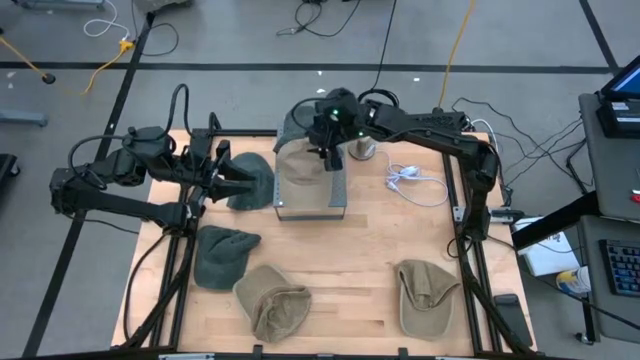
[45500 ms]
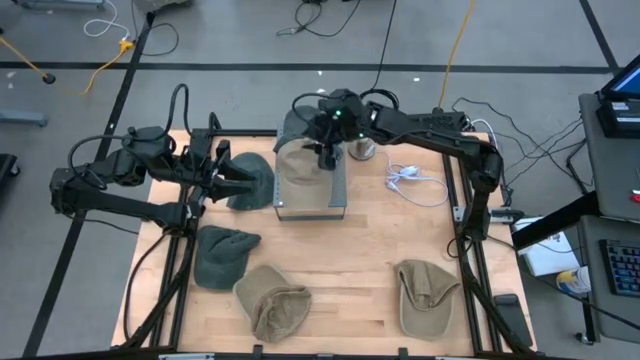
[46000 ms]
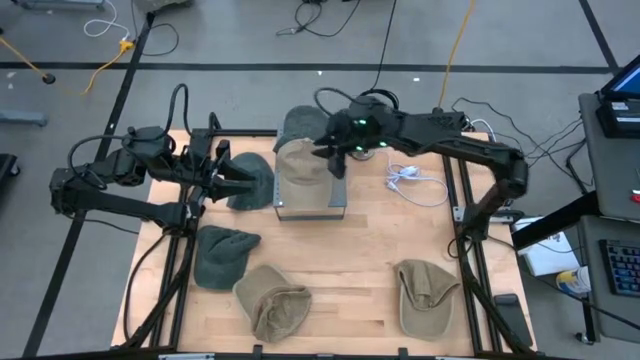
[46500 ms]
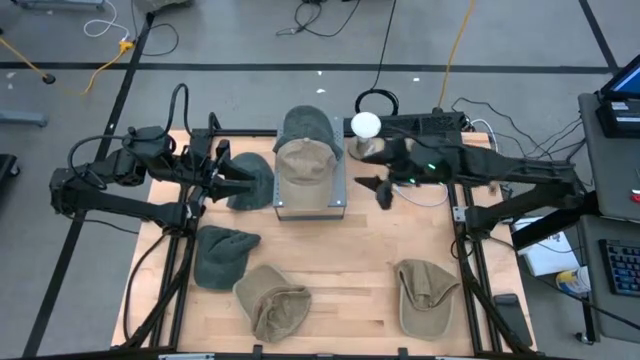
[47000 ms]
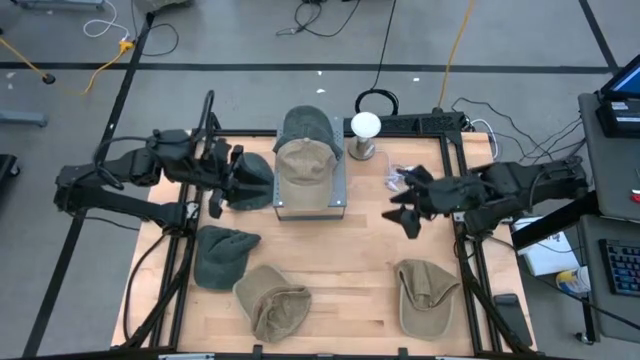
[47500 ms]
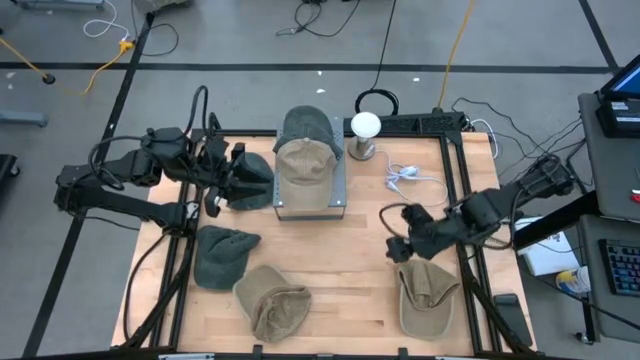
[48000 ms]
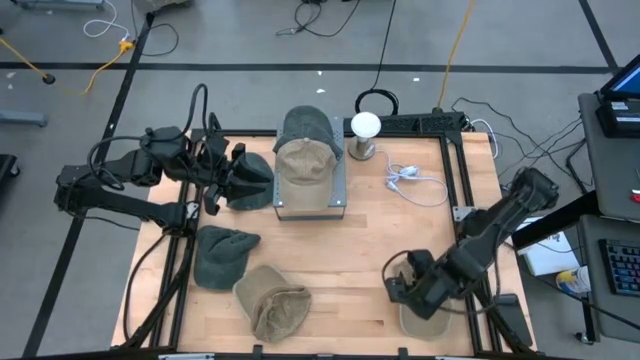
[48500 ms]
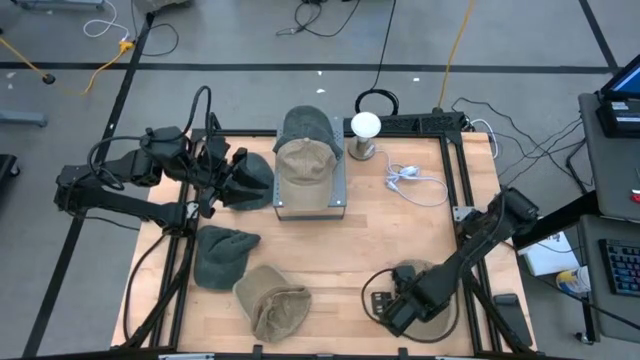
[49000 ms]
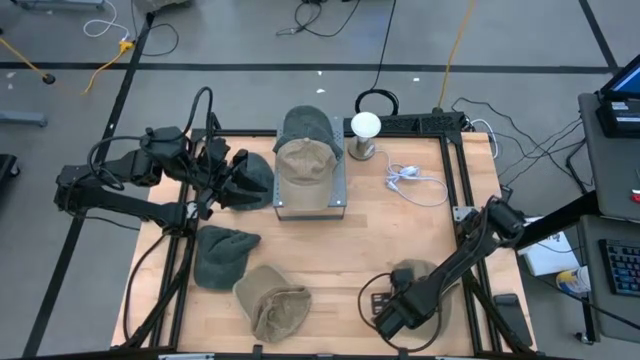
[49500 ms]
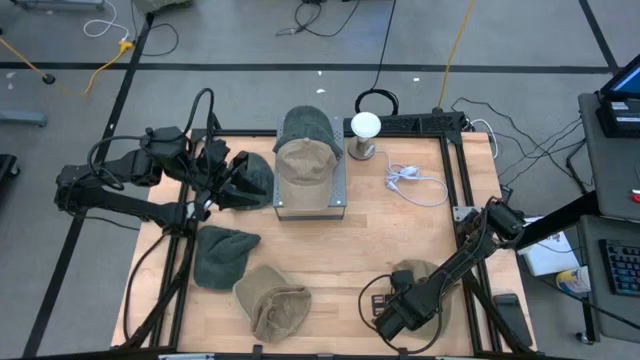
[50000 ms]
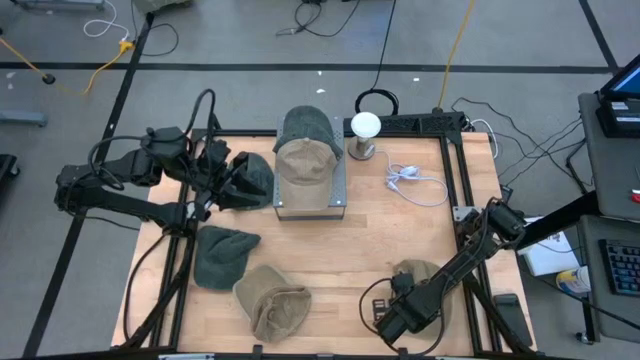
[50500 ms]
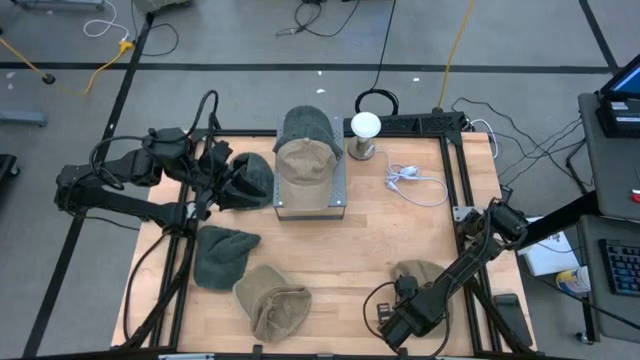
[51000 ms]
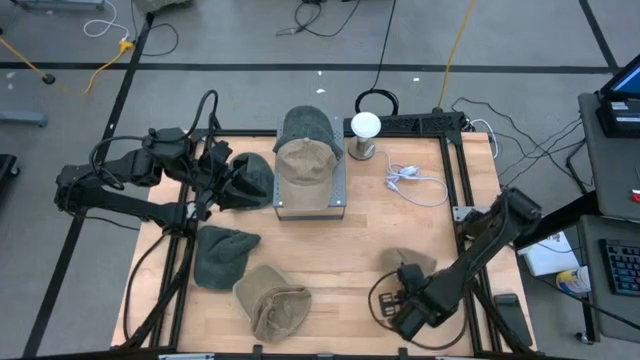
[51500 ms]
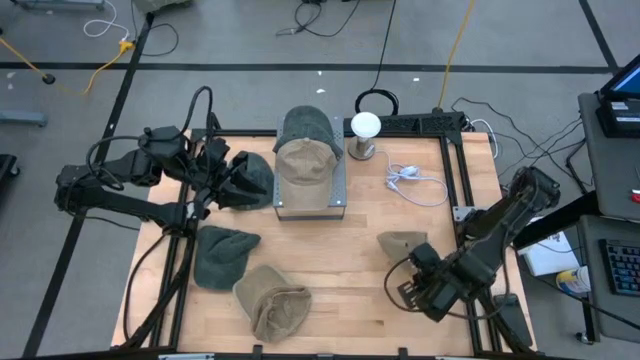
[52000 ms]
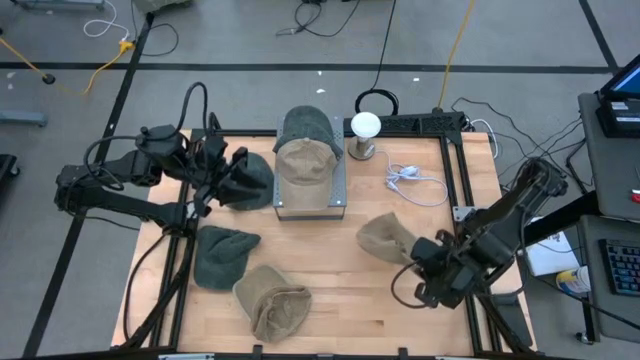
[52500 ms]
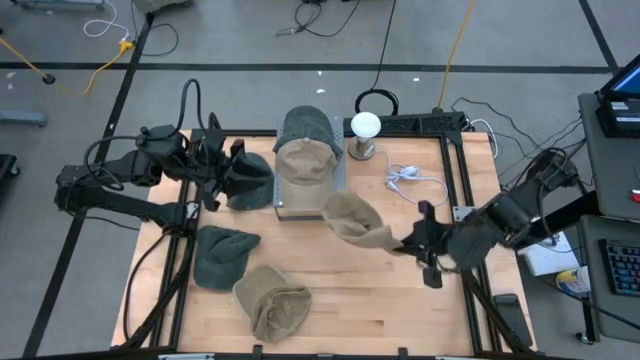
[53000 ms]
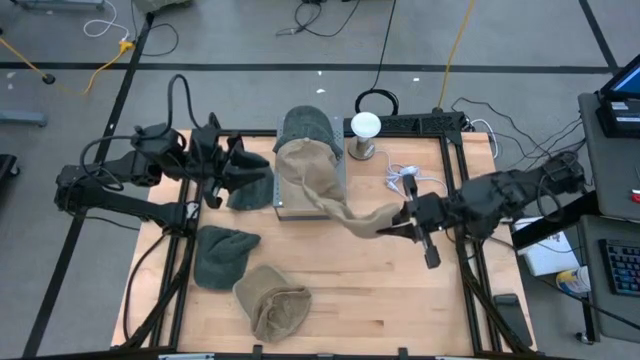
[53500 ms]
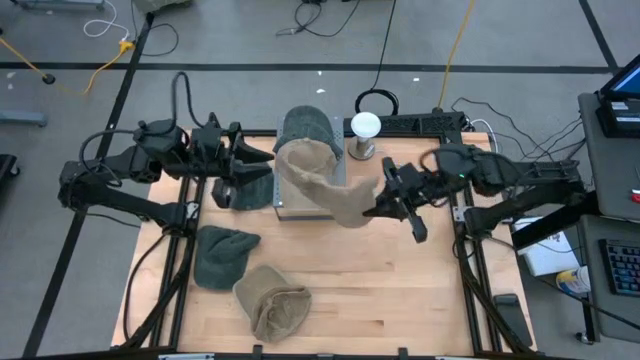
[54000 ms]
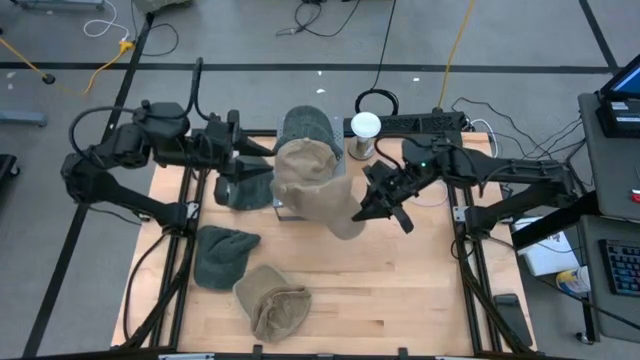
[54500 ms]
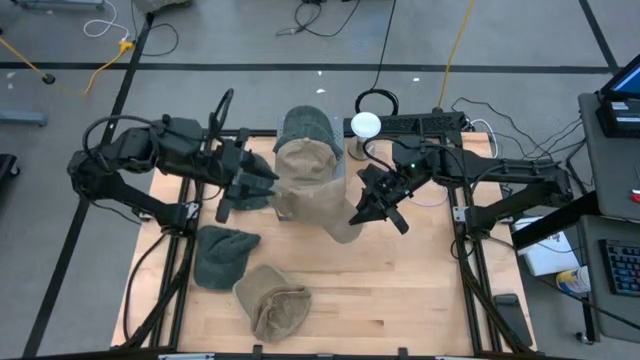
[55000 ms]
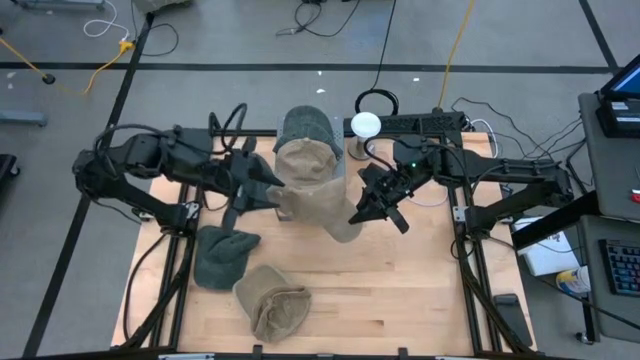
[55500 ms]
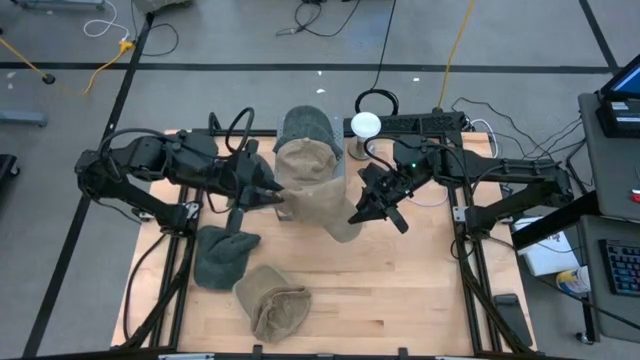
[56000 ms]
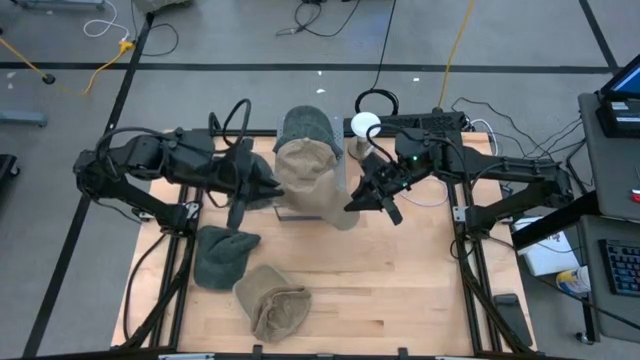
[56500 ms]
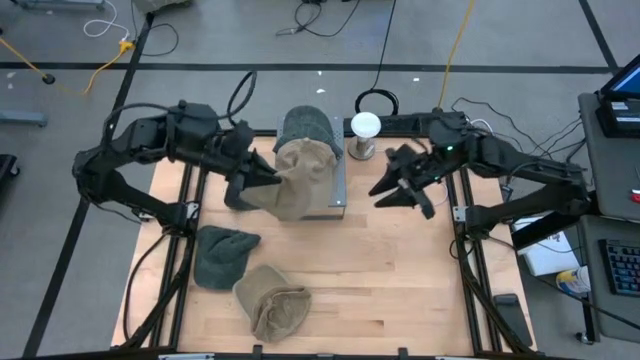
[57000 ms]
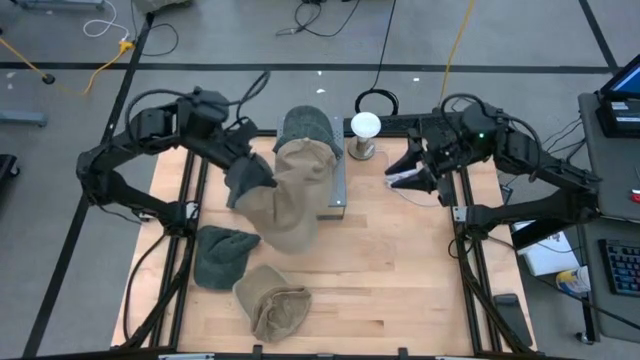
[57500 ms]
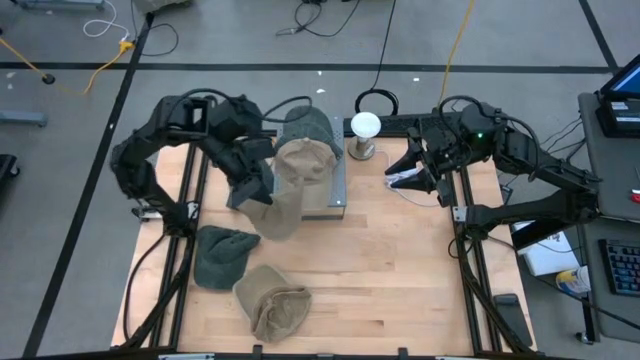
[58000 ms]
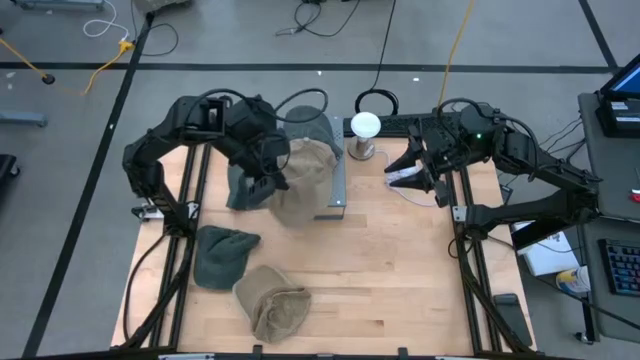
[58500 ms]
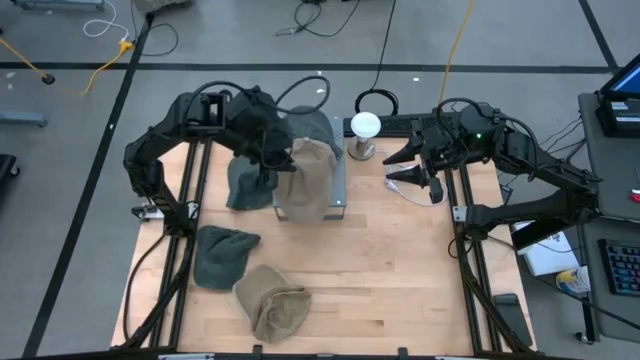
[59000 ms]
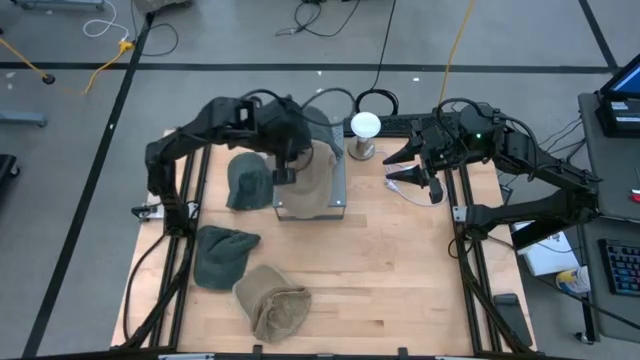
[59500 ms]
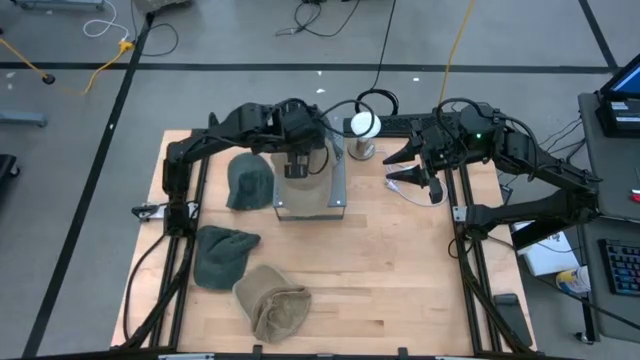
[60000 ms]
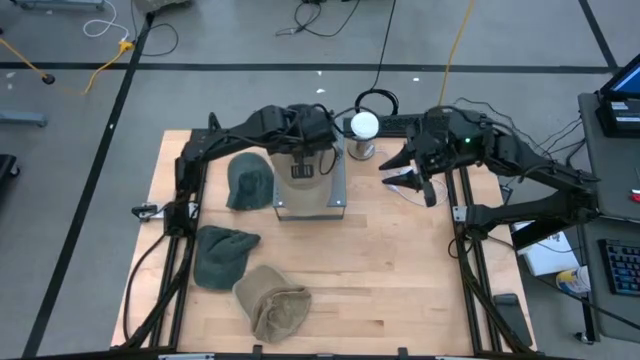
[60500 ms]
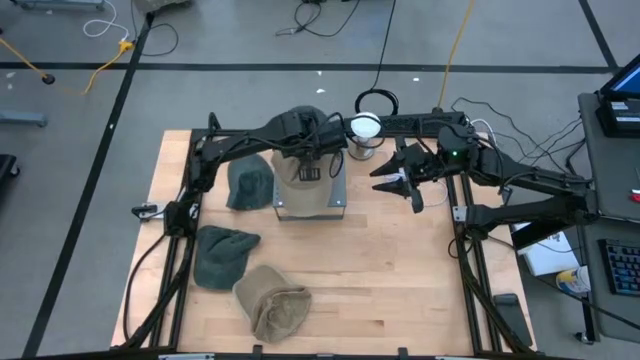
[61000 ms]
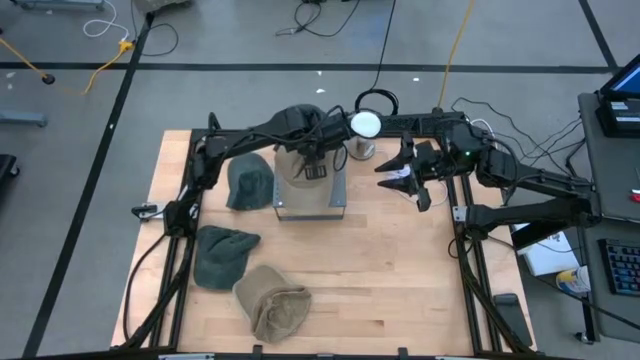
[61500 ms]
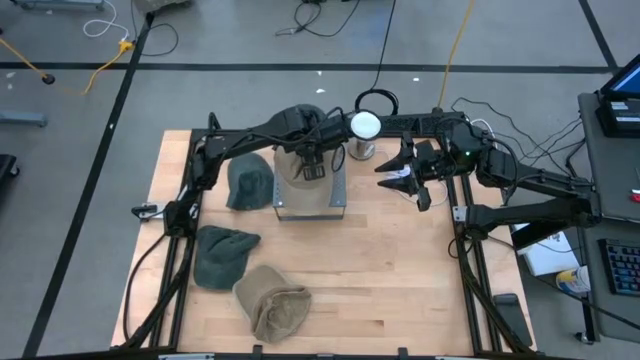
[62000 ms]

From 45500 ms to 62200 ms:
Task: Pick & Place hat
Stack the right brown cap on the brown cap on the shelf

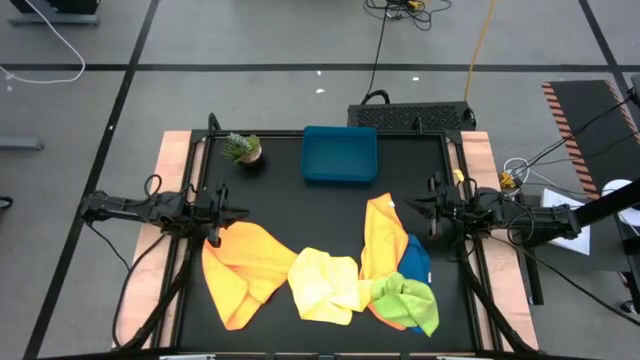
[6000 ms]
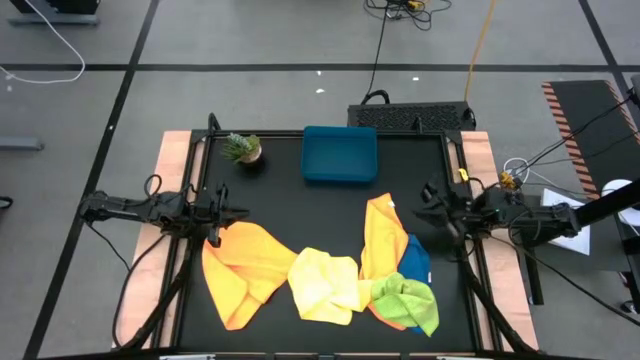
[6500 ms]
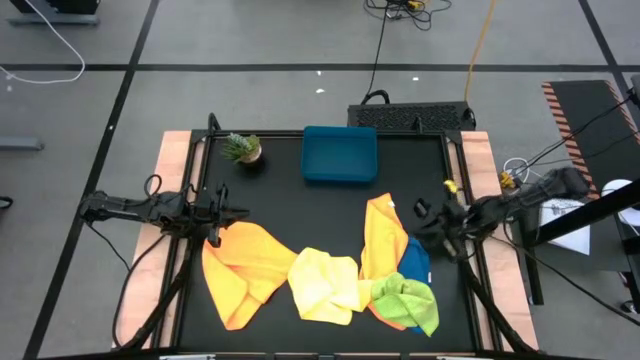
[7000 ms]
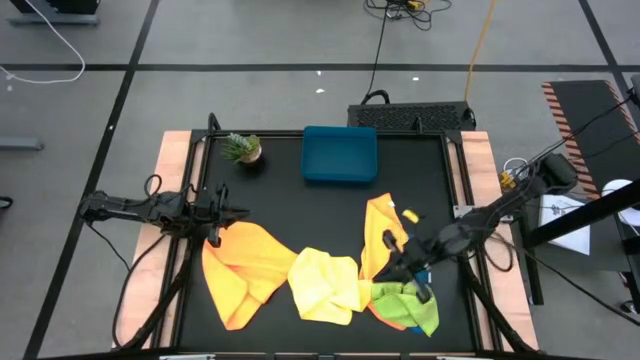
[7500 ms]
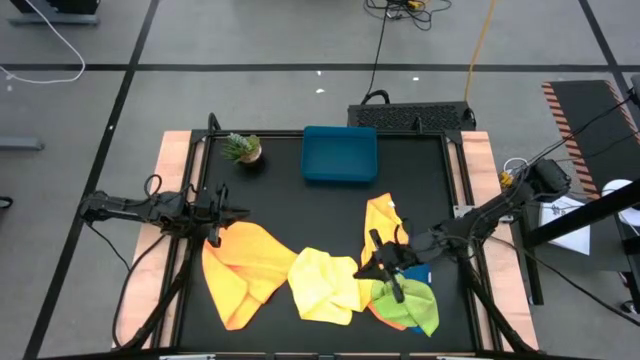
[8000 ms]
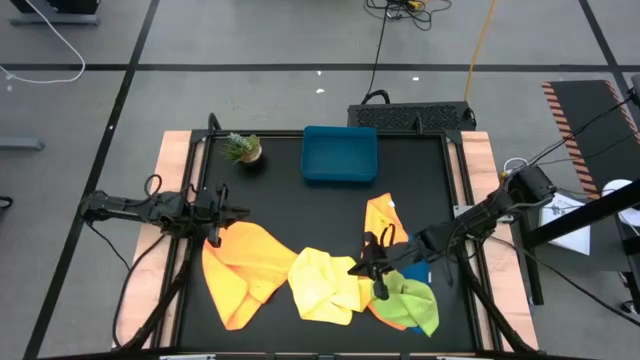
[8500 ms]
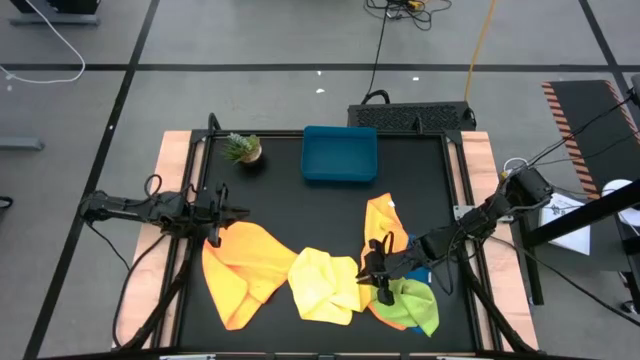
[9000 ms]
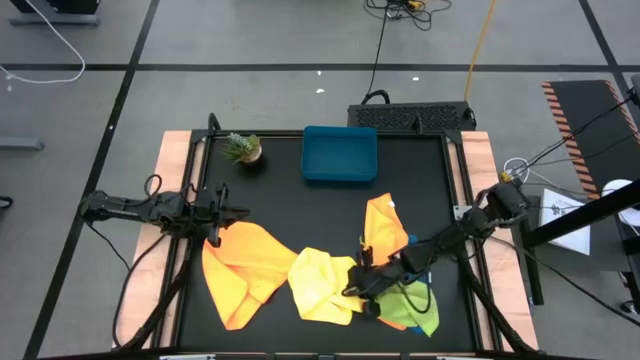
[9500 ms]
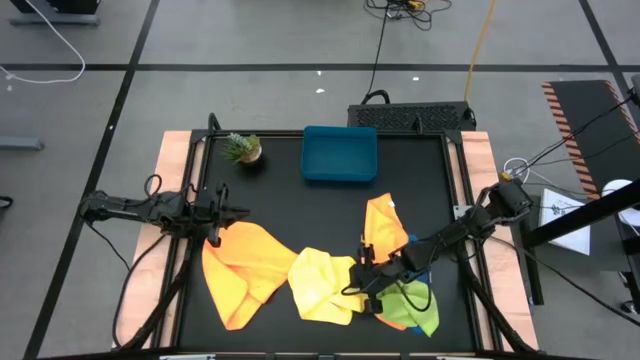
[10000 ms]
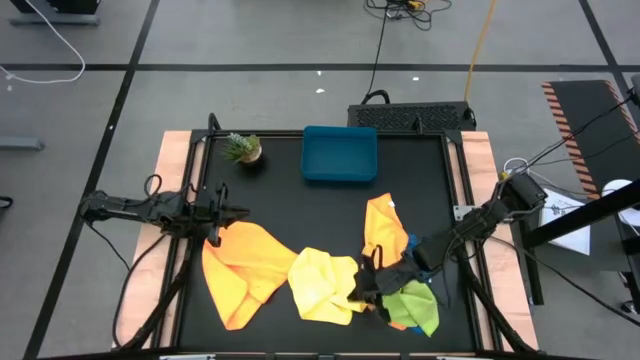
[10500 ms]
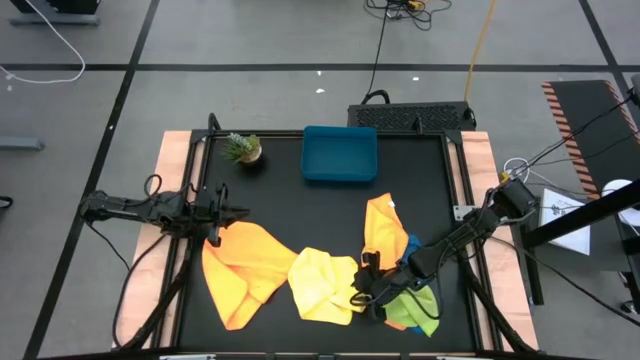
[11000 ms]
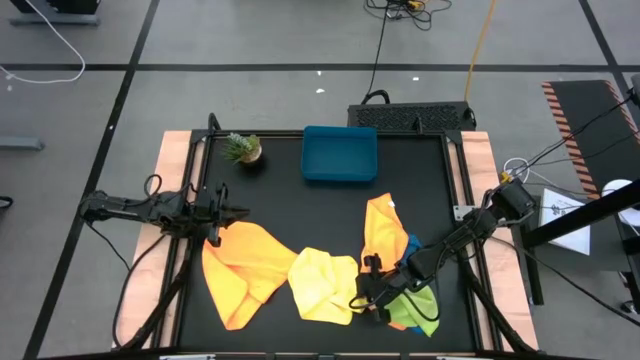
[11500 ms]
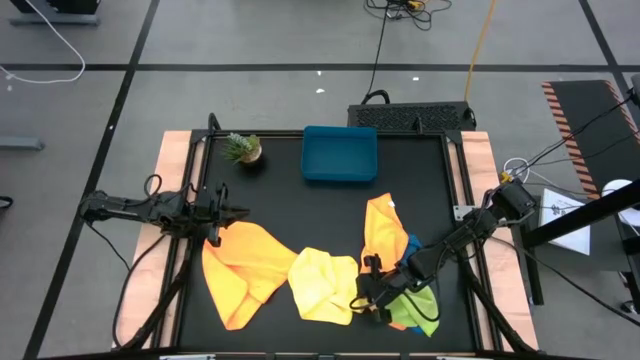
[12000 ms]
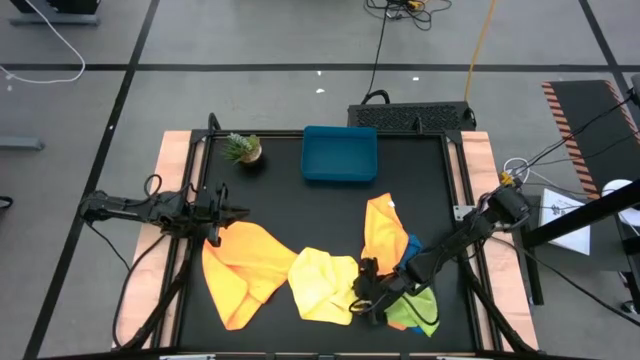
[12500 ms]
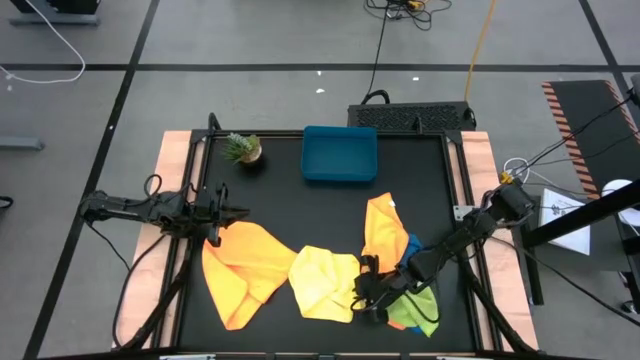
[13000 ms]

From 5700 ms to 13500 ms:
Task: Fold microfiber towels
Fold the yellow microfiber cloth
